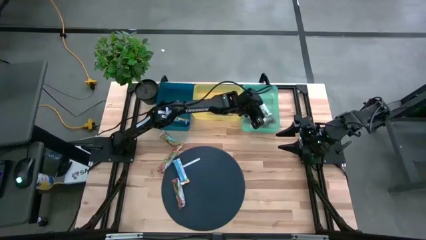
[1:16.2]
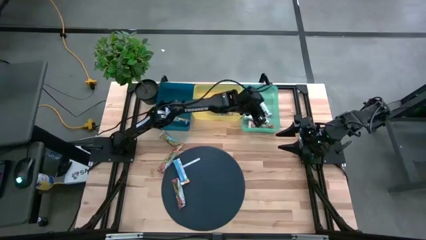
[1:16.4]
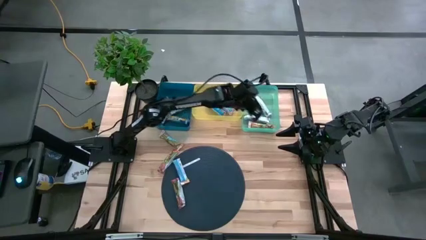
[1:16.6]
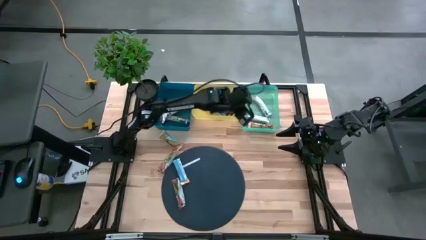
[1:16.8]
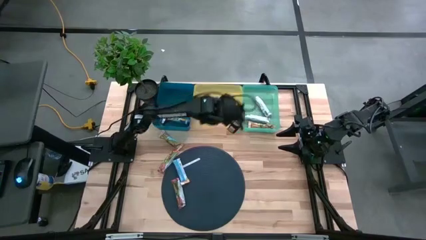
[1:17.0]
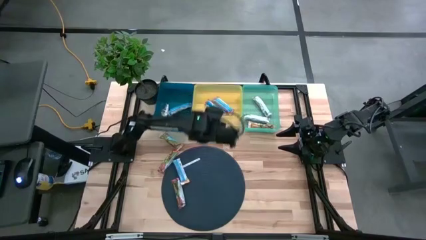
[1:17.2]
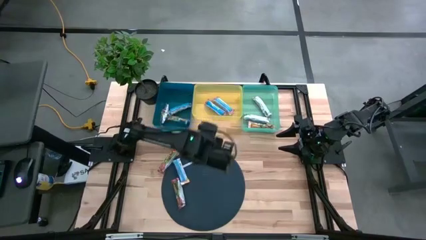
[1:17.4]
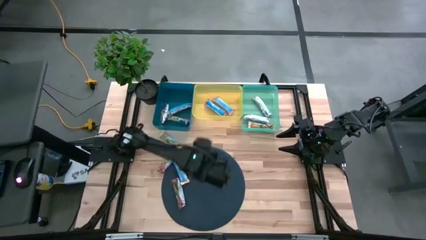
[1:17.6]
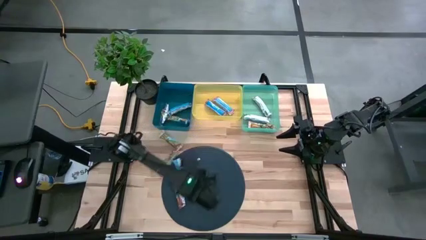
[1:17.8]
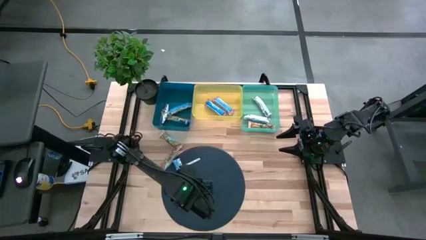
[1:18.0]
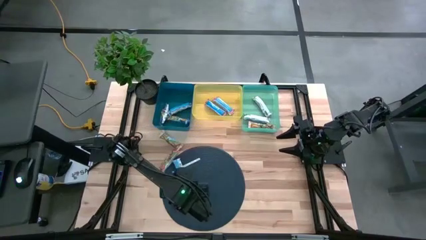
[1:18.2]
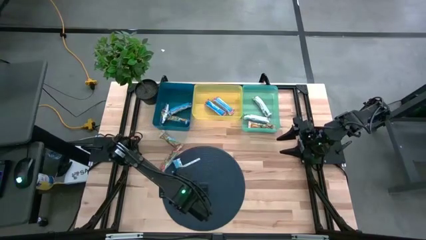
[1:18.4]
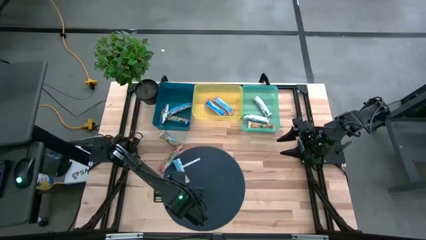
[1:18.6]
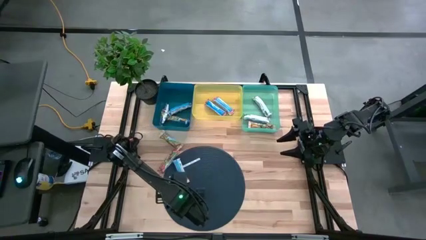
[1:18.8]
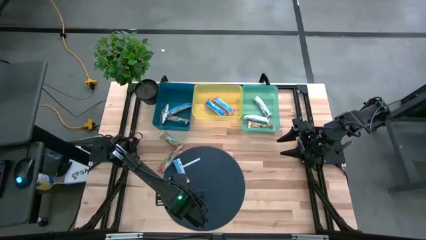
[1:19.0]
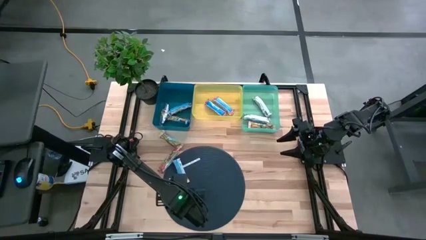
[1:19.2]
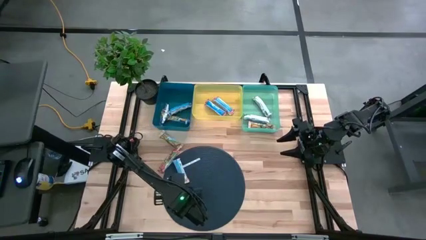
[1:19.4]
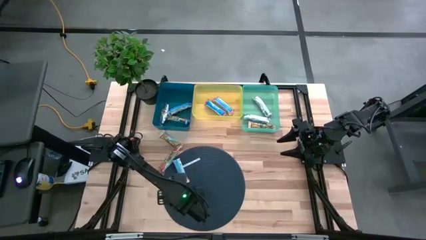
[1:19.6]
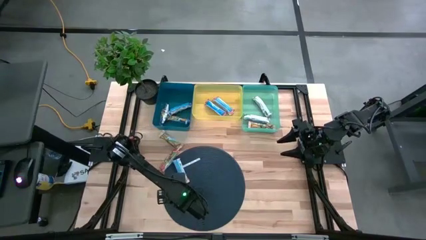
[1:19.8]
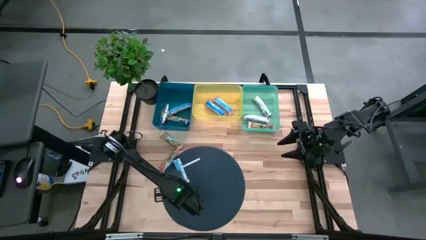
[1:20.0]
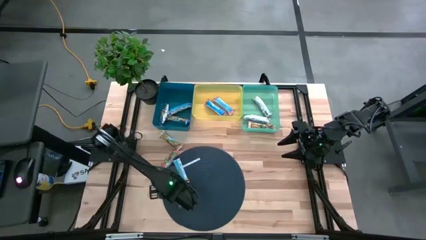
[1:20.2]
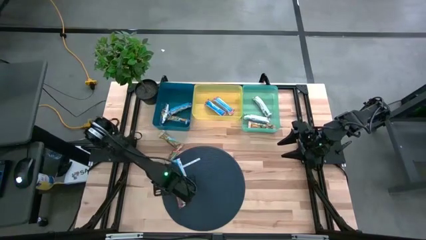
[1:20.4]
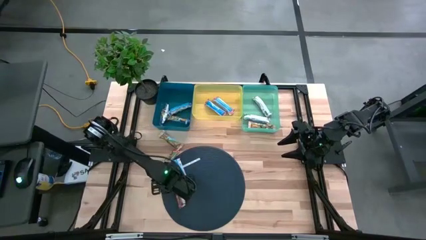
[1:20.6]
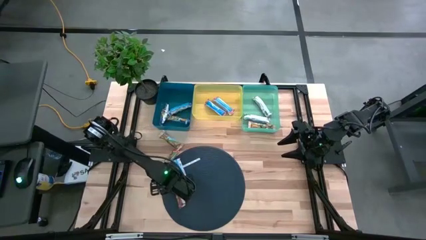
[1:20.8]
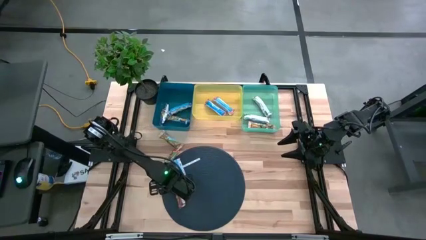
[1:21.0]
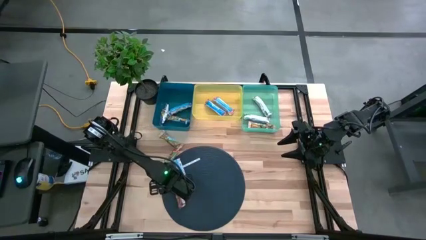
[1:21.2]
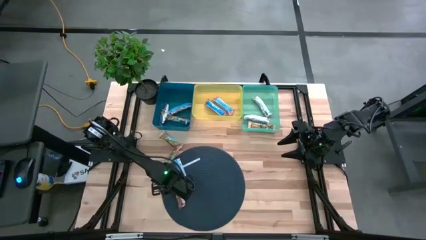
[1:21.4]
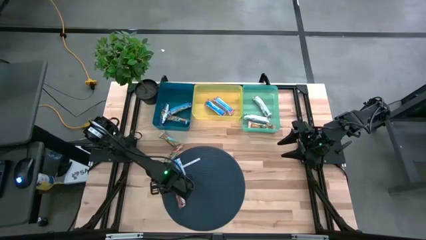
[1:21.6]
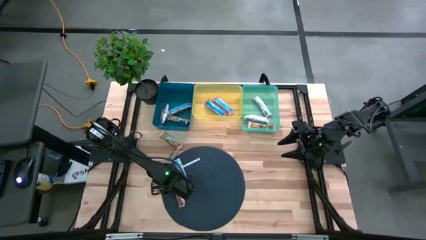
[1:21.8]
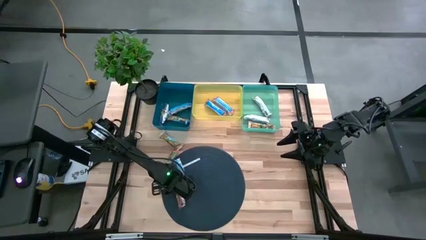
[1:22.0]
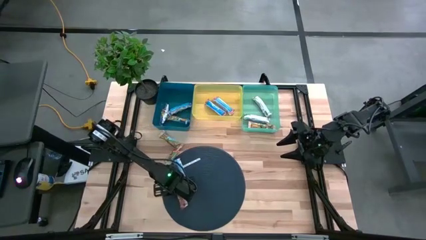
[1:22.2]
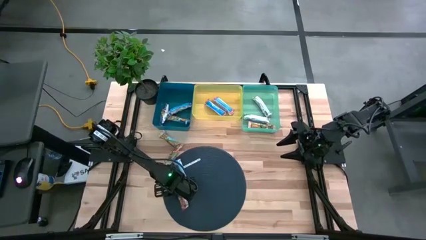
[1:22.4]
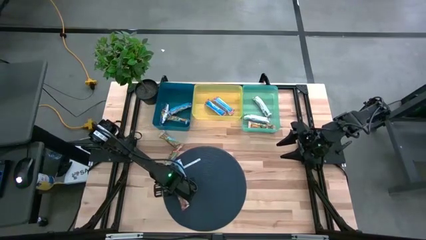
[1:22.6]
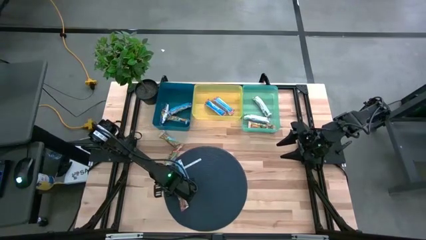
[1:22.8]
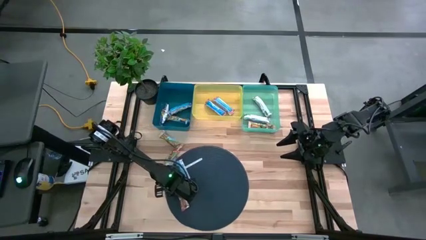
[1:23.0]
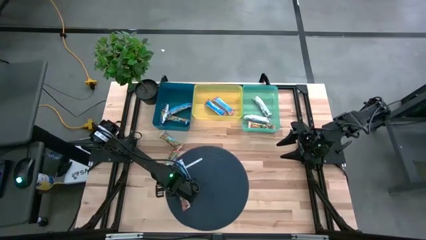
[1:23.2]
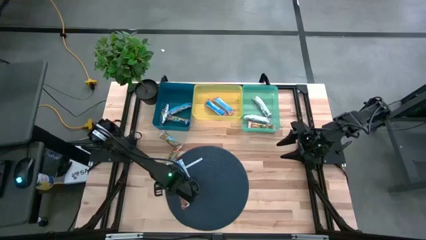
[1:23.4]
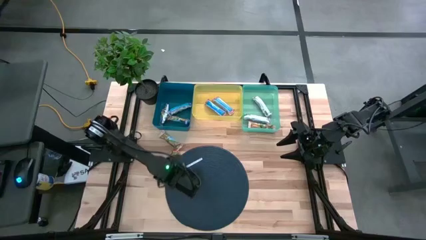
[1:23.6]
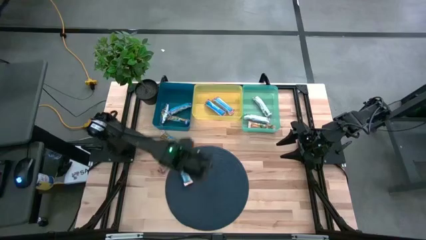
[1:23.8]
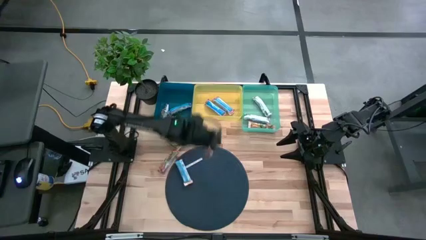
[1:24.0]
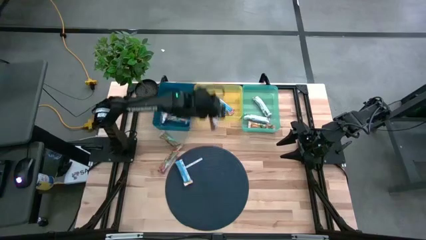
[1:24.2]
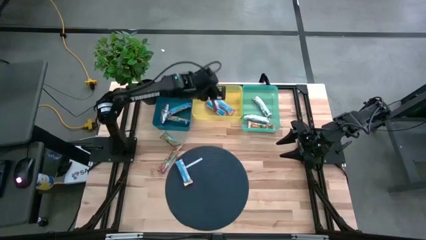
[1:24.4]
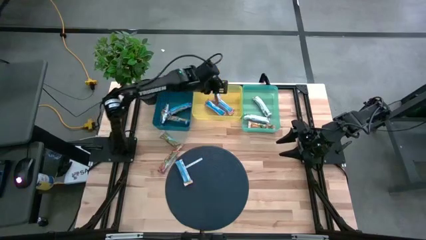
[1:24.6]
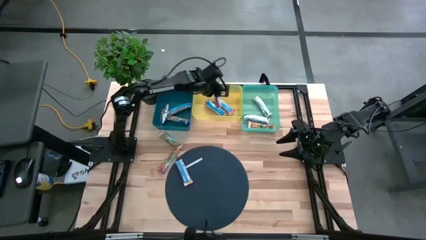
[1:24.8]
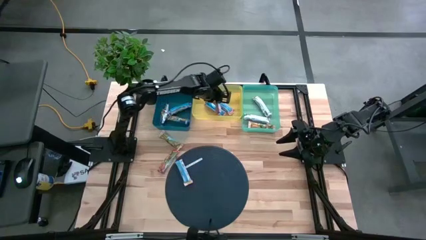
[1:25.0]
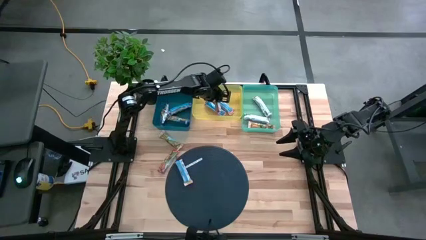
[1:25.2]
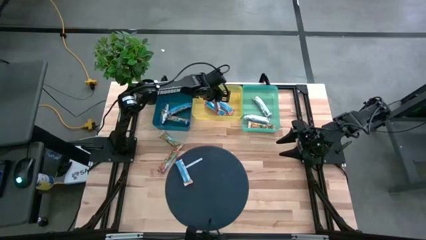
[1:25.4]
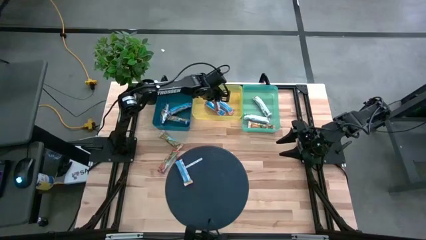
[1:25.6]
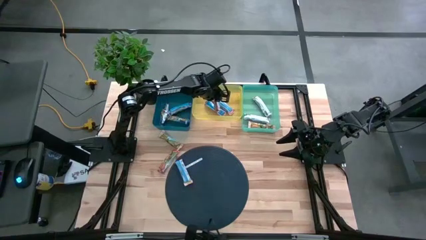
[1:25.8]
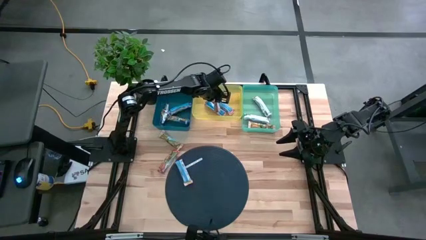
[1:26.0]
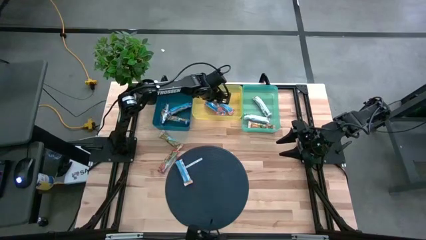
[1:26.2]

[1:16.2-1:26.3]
Task: Pick and place Granola Bars by type
Put the red granola bar into the yellow bin

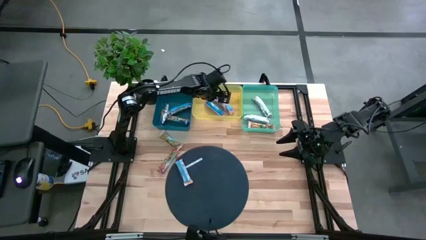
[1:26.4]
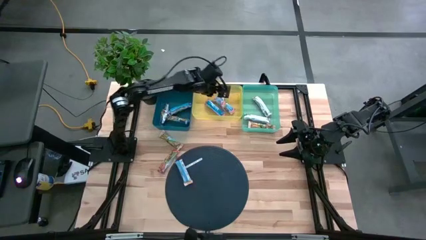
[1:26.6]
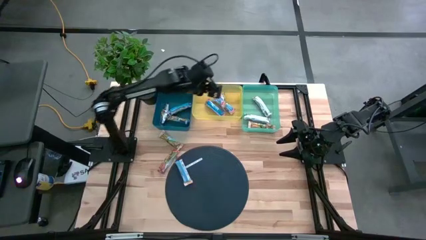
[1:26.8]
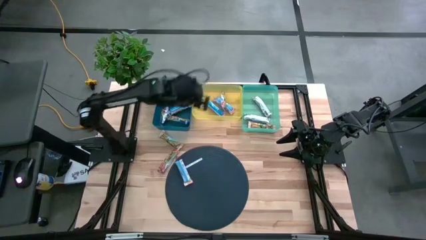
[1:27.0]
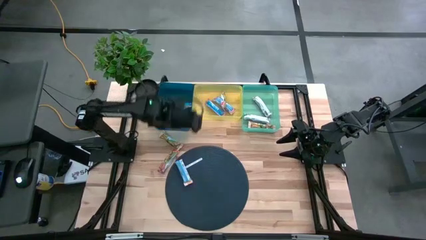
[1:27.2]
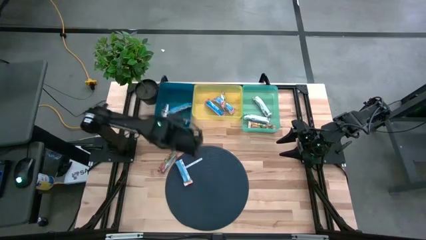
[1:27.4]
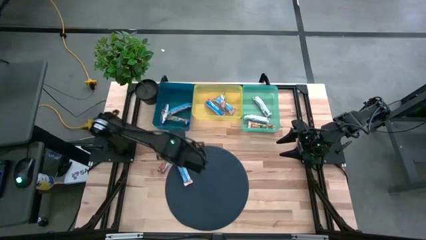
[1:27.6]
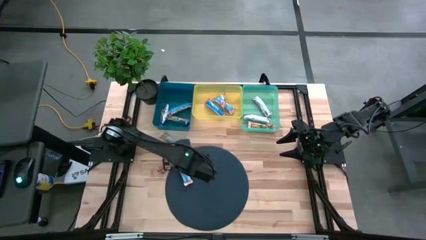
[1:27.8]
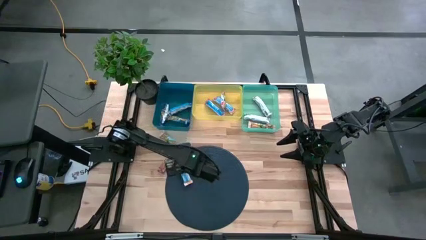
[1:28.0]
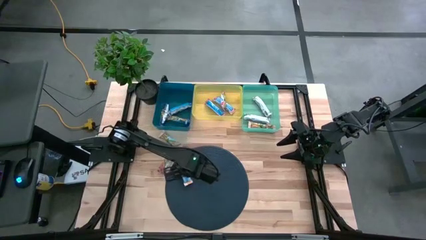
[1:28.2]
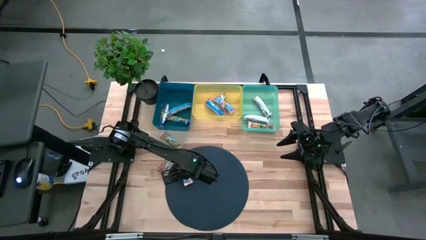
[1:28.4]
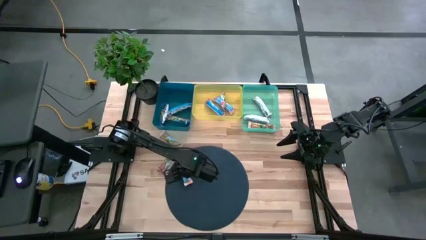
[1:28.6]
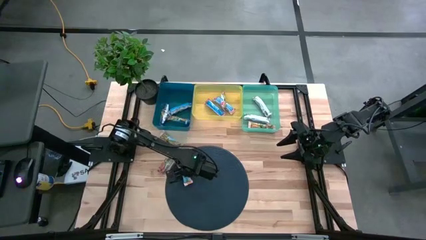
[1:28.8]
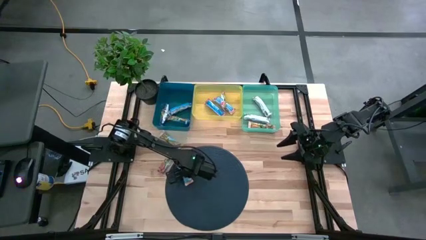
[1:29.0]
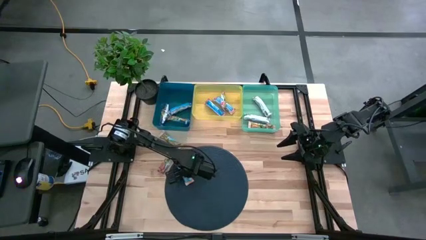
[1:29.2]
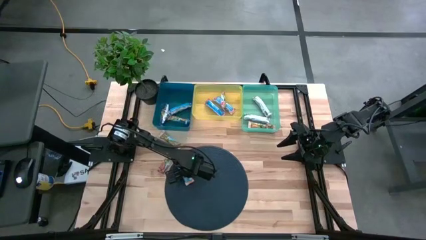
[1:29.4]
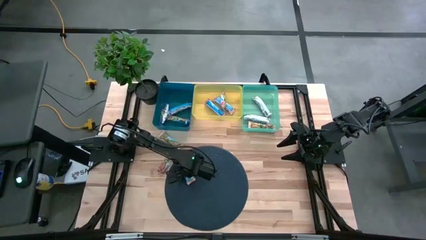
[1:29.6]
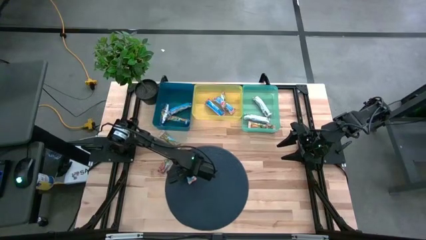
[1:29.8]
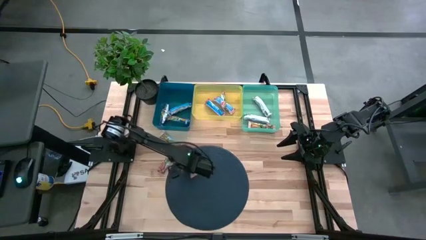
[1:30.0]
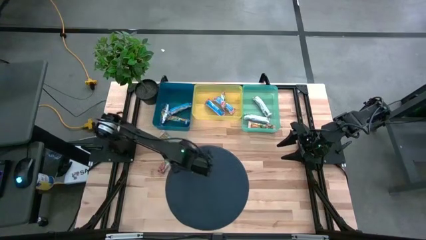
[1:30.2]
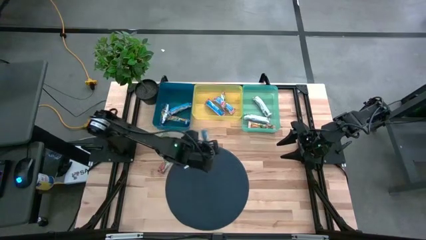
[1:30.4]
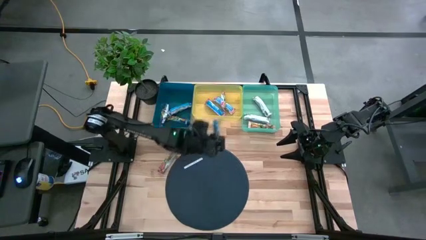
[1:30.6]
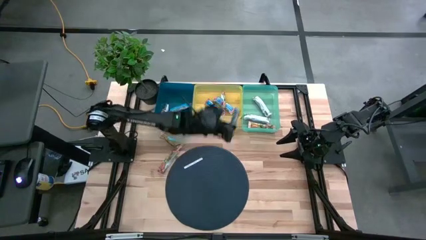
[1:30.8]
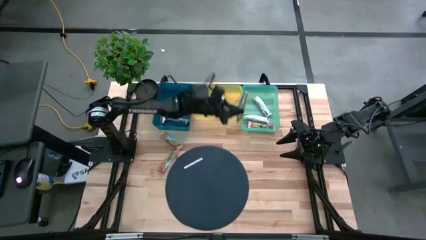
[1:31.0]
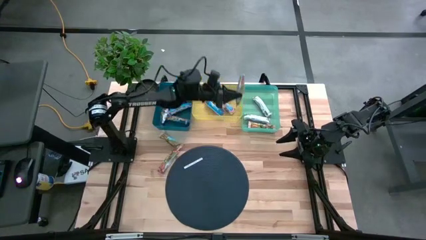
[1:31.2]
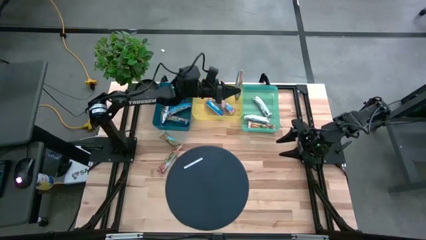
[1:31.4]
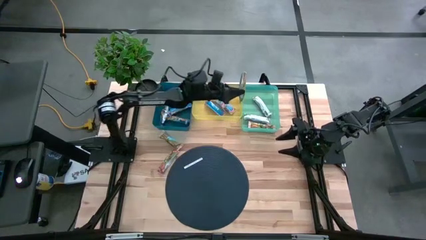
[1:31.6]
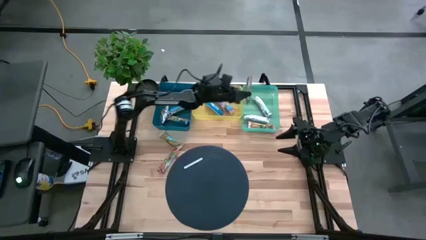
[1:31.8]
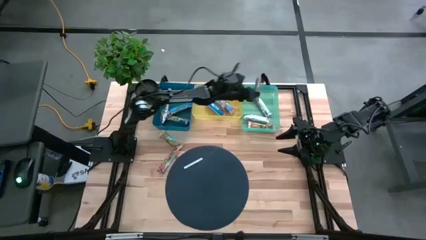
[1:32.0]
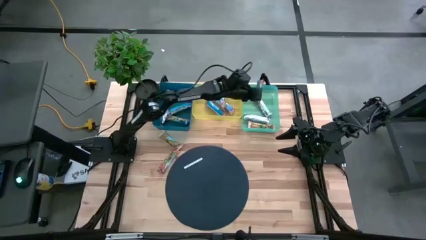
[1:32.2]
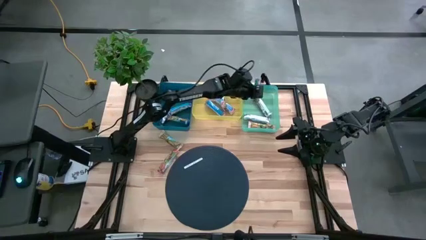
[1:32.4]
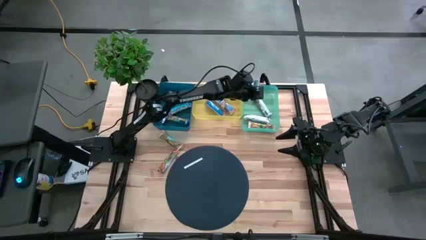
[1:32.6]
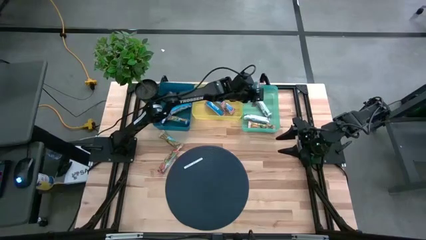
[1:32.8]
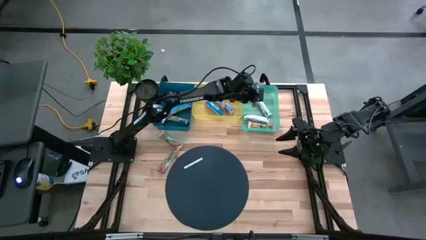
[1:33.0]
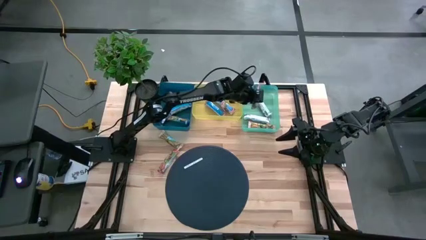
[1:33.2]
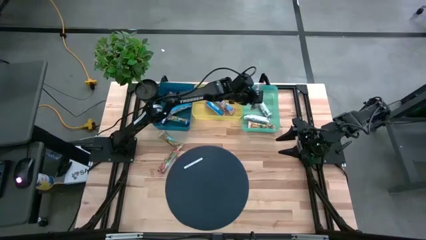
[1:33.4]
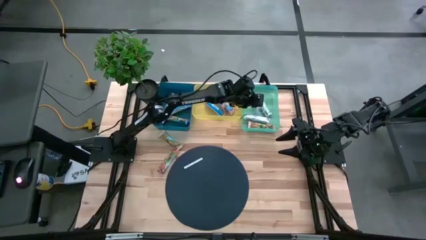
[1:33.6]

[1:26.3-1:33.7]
Put the yellow granola bar into the green bin
